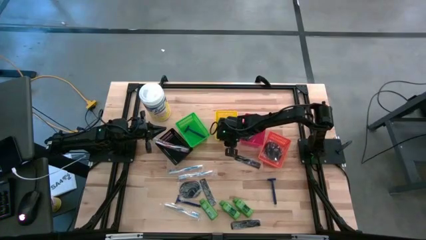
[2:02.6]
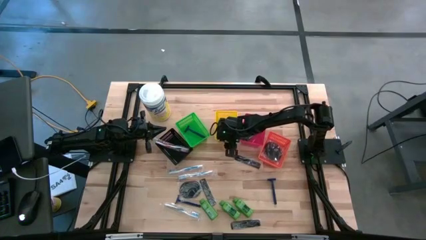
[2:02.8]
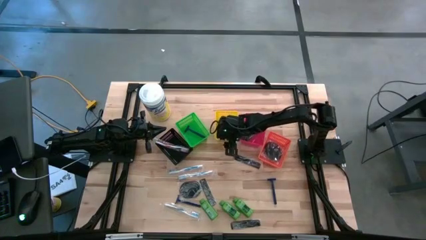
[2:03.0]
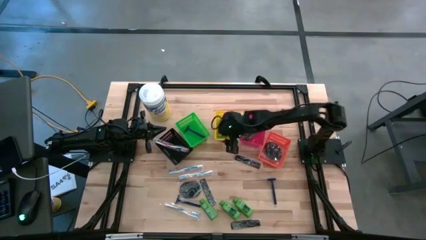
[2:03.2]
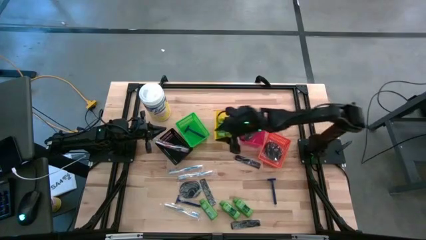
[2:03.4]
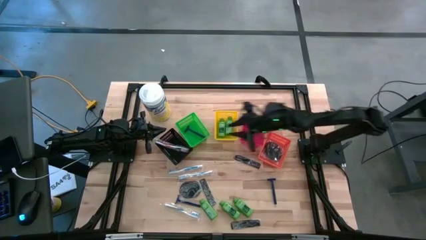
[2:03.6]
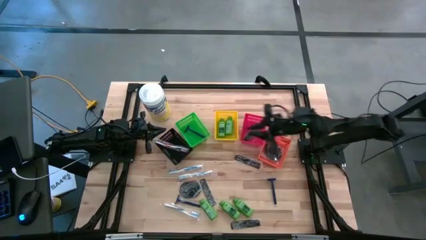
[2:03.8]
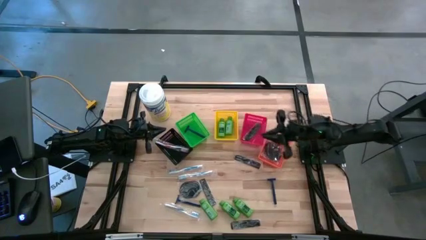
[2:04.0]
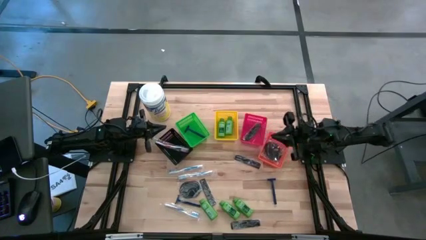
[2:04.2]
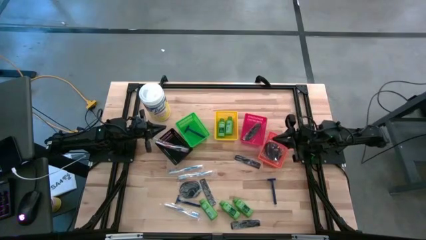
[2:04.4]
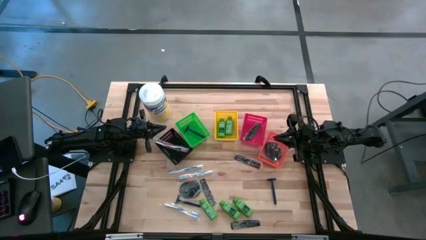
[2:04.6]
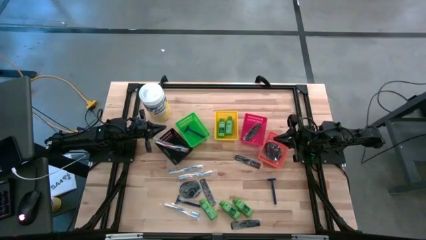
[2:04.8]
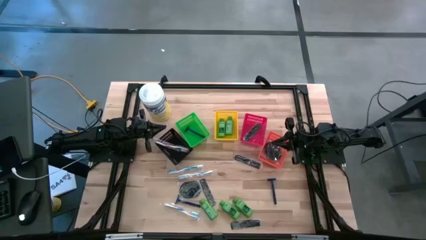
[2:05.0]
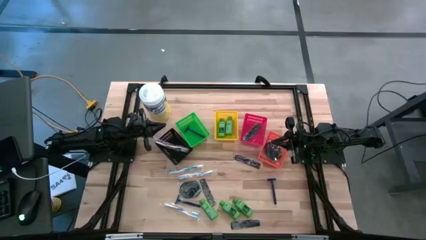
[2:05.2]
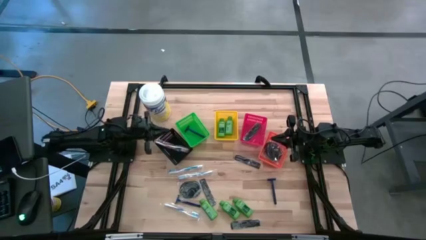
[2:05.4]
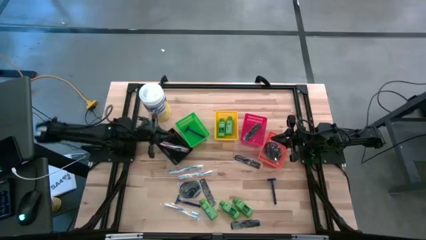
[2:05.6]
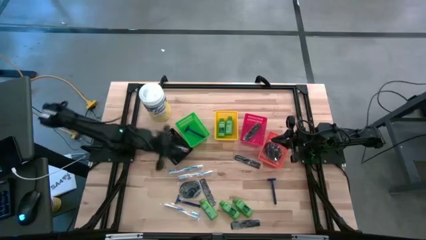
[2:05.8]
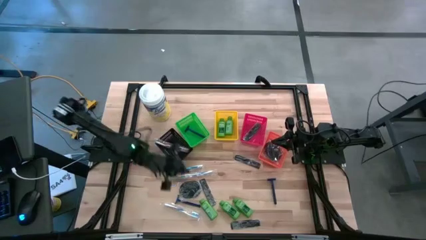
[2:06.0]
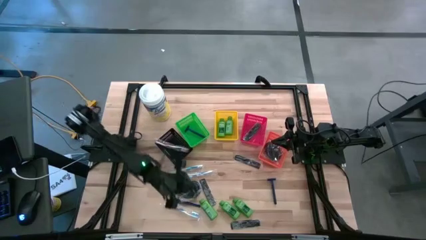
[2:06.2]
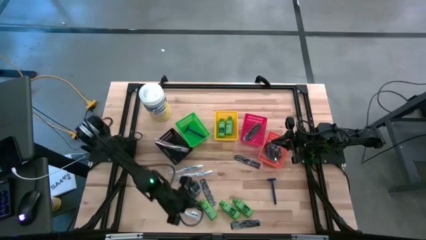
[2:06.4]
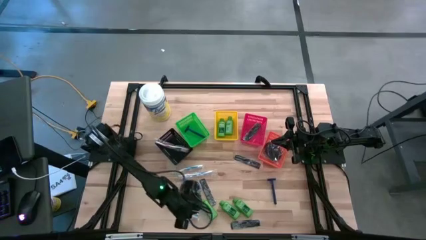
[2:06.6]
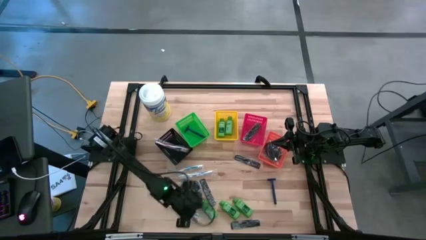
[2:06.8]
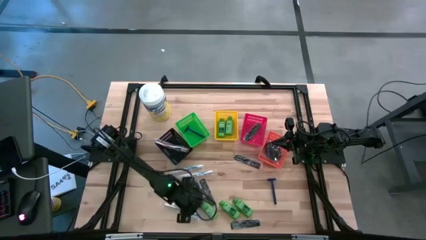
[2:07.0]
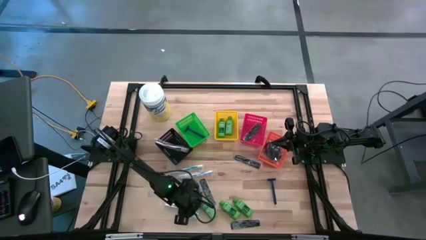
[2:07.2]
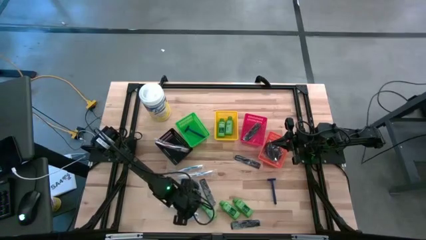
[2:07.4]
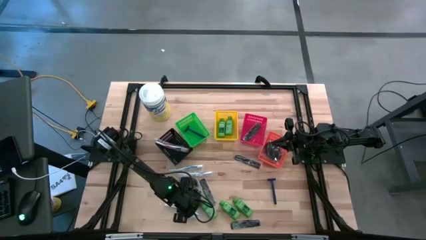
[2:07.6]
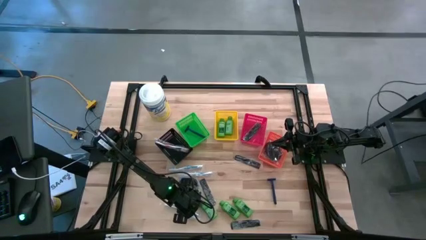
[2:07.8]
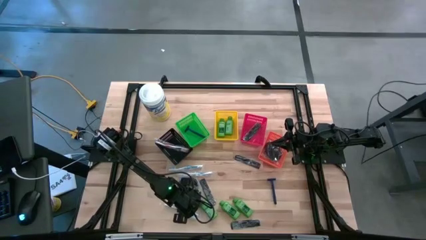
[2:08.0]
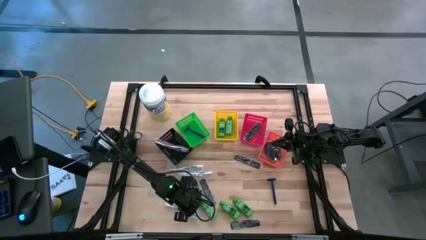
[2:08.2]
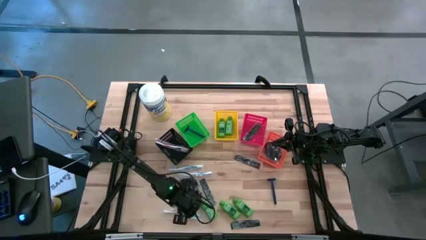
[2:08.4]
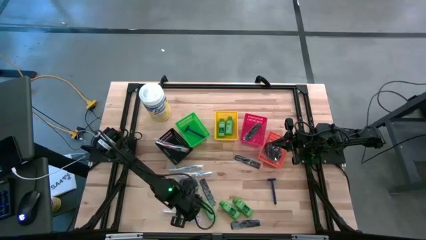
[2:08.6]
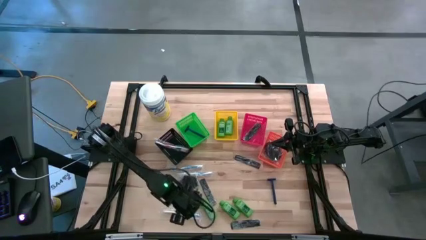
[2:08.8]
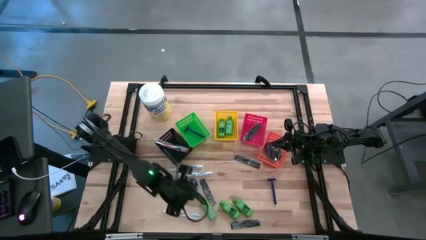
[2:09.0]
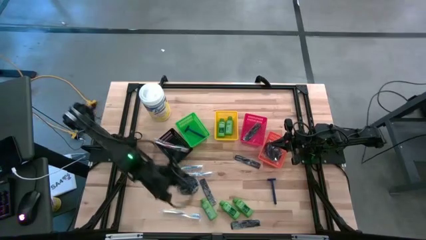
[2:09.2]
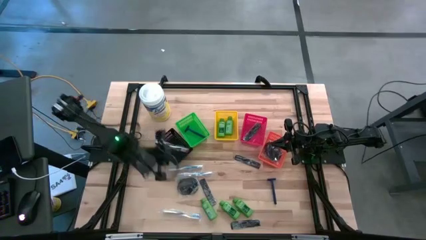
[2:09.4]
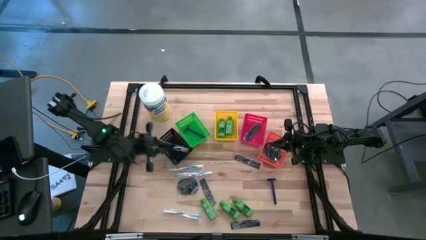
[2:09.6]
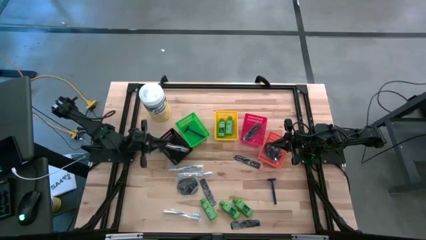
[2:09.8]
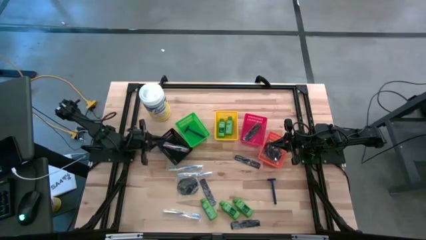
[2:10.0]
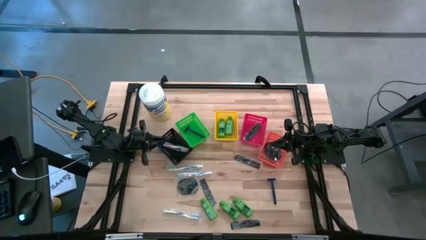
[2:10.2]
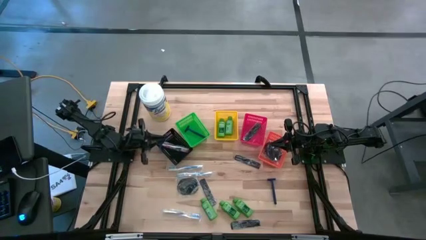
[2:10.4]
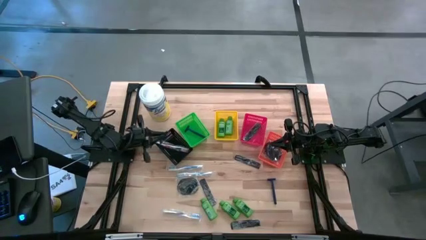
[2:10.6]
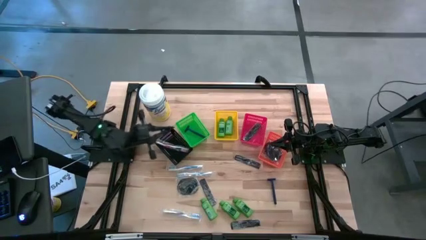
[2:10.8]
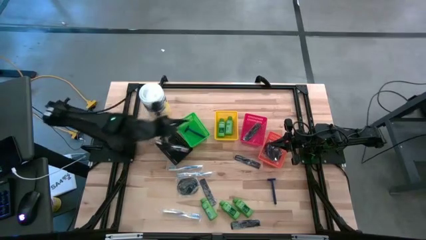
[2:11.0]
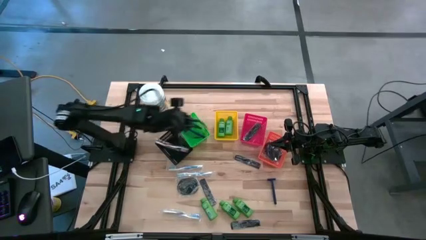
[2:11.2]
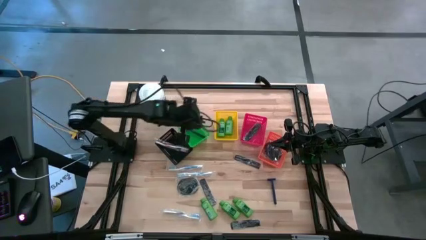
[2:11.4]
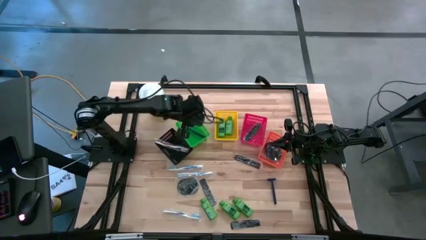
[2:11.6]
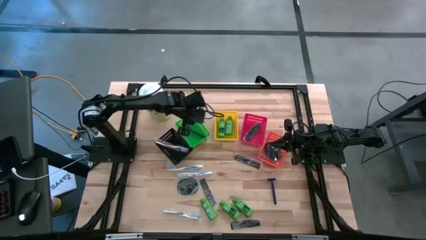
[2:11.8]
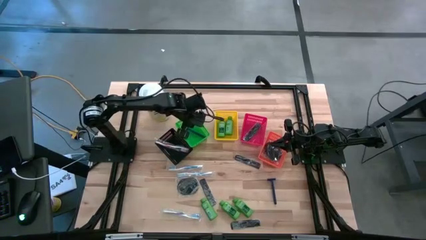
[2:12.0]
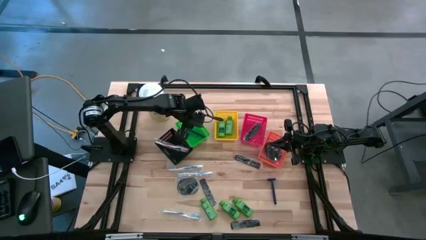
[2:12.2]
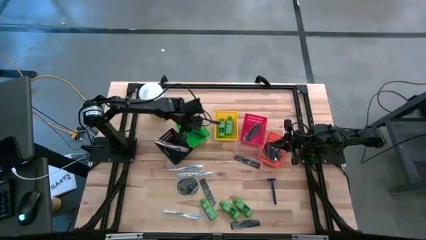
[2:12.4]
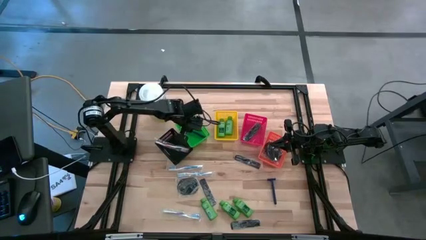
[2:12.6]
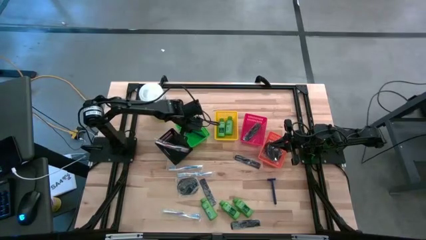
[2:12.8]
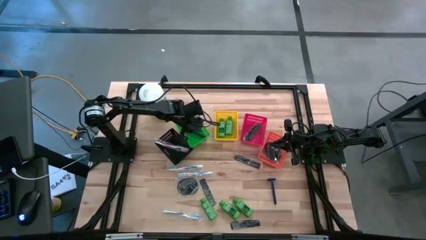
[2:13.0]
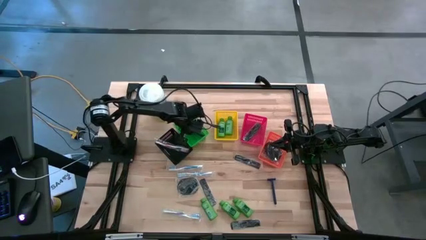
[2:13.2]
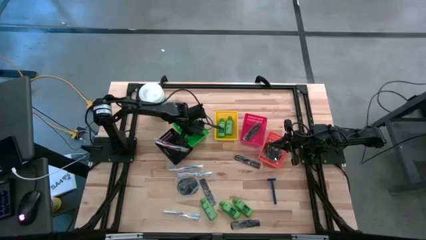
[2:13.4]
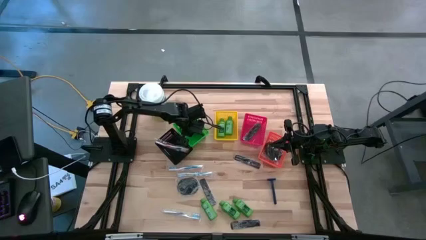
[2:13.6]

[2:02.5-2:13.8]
Task: Pick & Place Travel size toiletries
Put the left blue shaver into the green bin

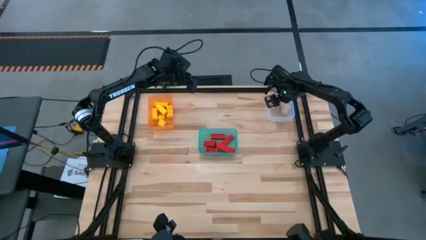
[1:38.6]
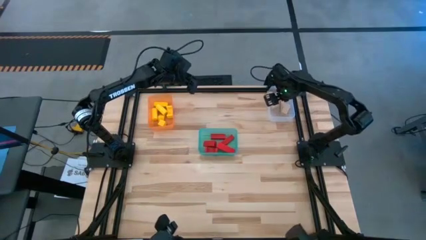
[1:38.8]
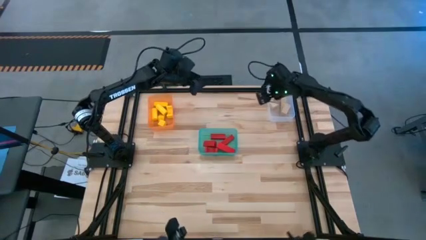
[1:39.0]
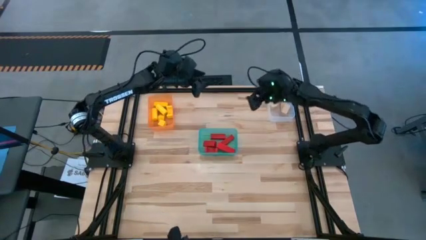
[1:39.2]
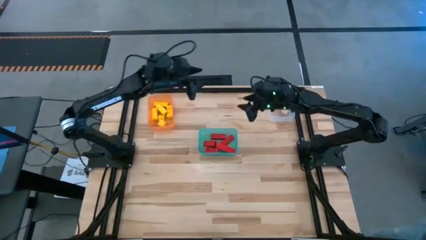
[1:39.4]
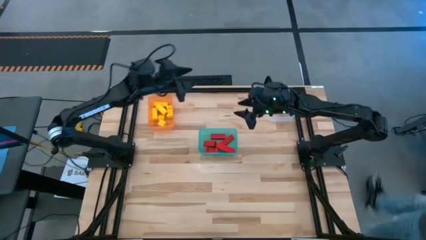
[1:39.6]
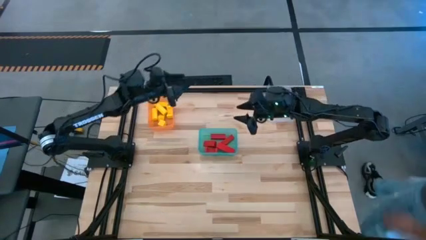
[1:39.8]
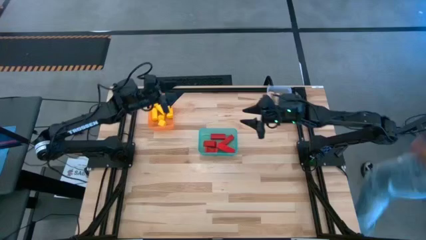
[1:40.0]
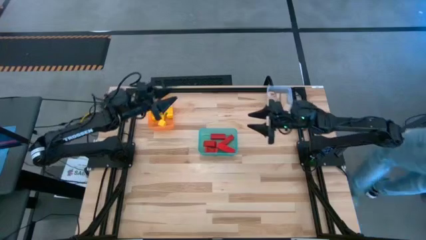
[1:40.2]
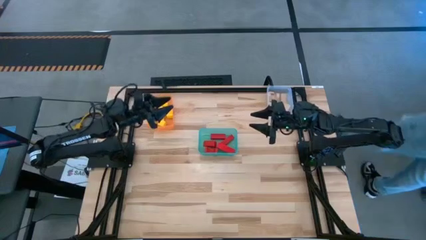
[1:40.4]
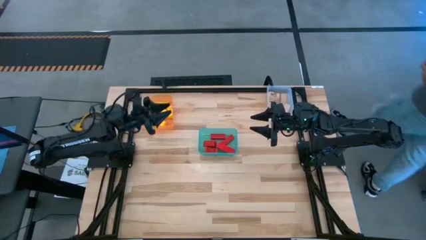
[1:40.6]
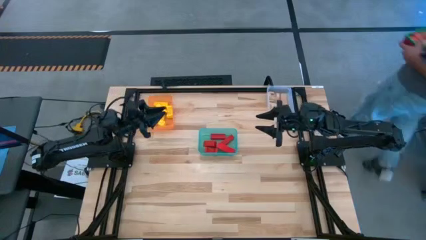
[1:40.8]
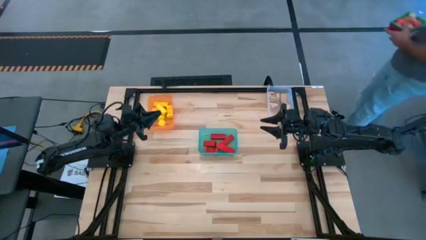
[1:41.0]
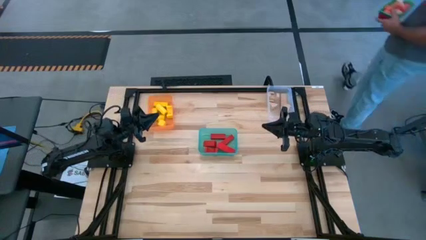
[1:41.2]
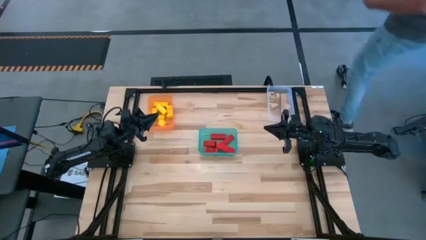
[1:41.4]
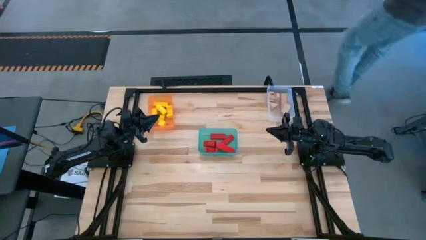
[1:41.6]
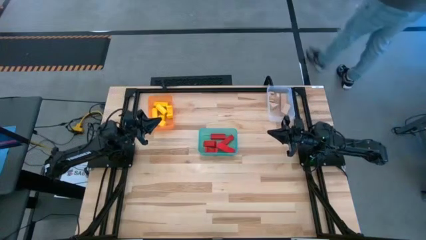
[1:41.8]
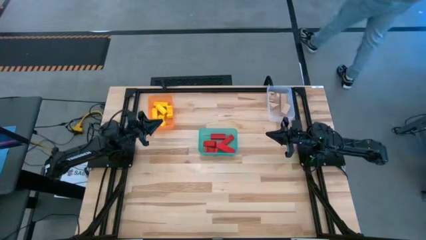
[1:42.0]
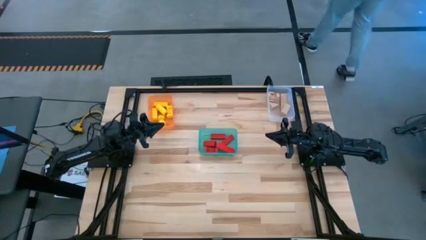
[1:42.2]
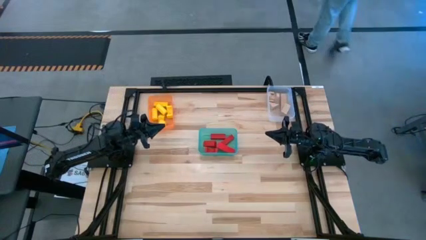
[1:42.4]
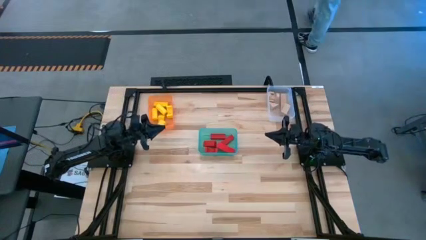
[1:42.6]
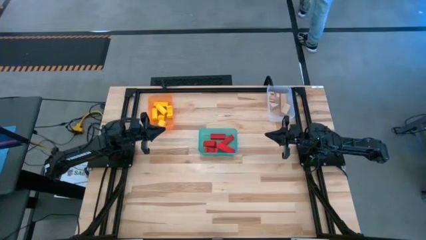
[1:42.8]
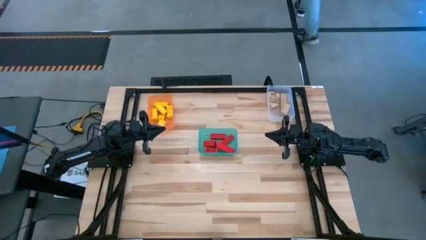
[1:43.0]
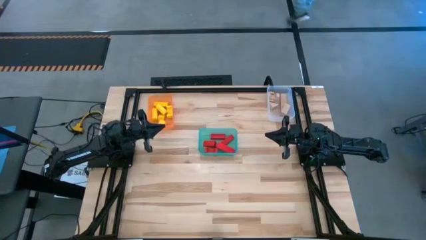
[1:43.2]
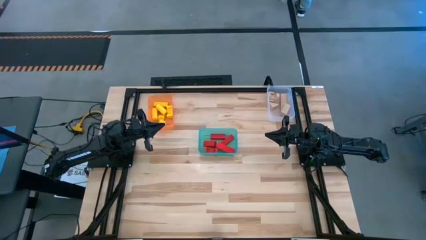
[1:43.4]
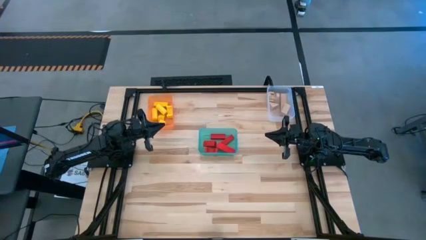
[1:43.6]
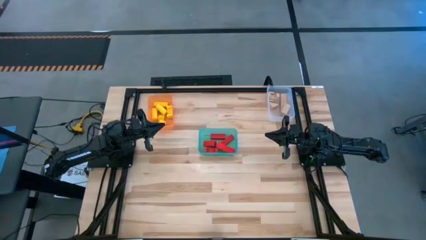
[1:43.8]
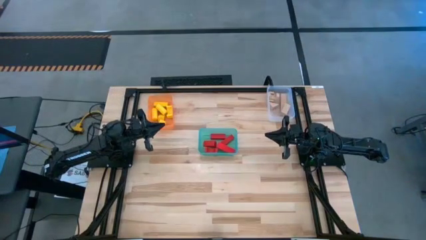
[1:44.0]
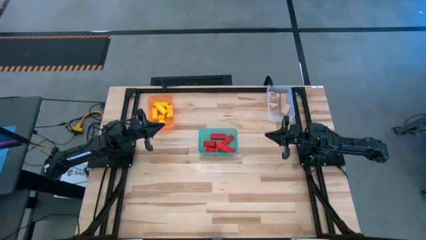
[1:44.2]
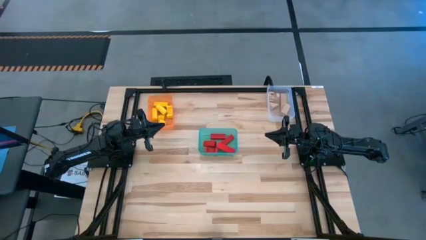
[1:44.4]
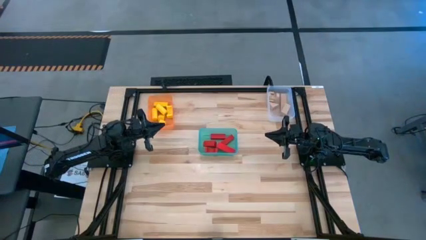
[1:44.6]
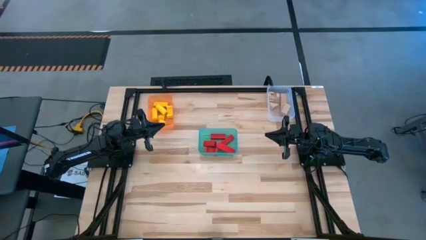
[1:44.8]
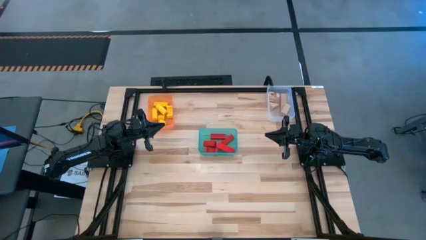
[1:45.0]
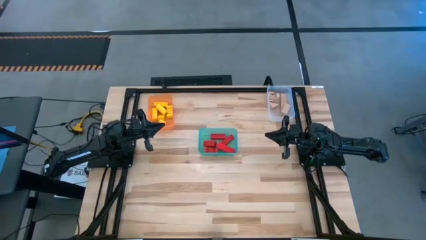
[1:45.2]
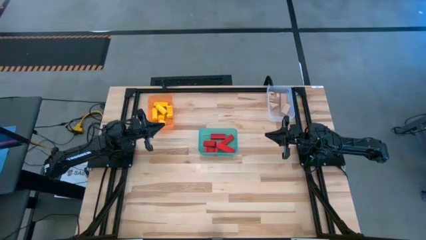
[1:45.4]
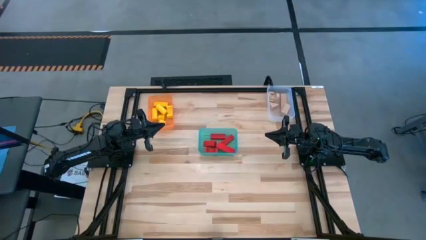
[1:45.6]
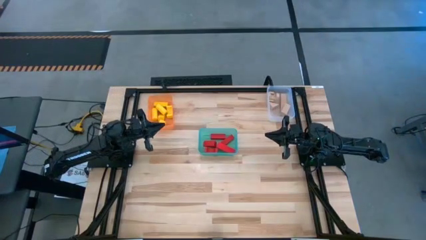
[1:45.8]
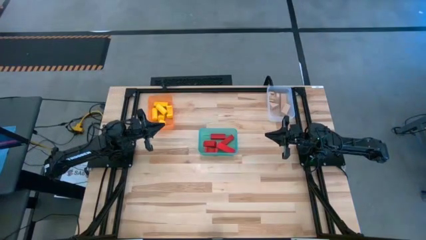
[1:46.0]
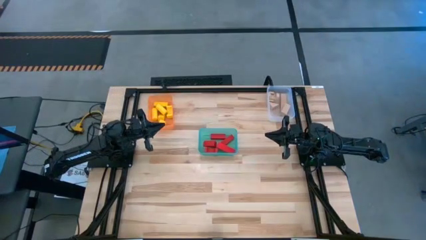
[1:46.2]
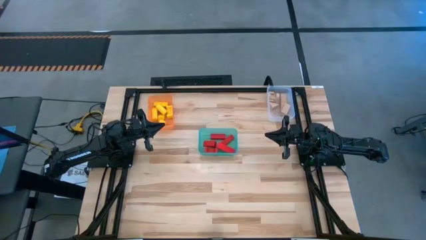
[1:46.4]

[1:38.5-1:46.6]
Task: Sort & place blocks by color
Return to Home Position
